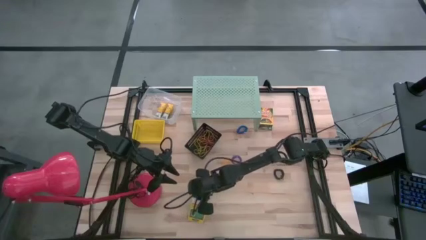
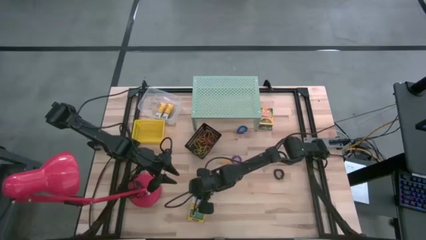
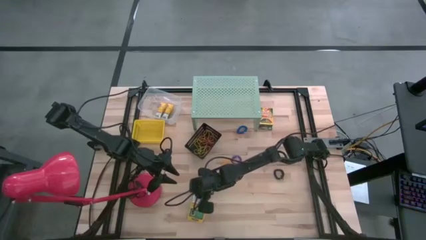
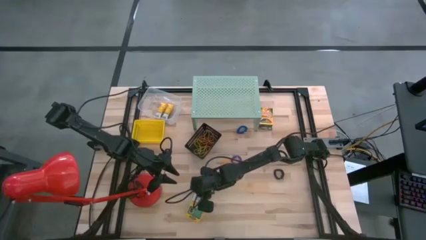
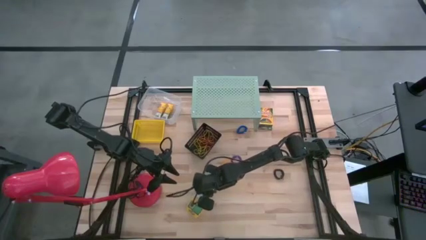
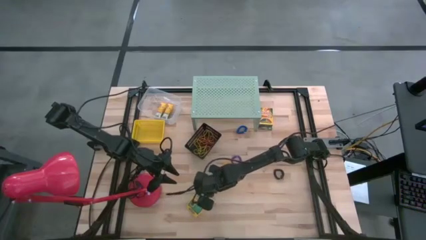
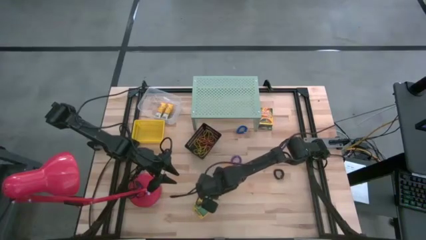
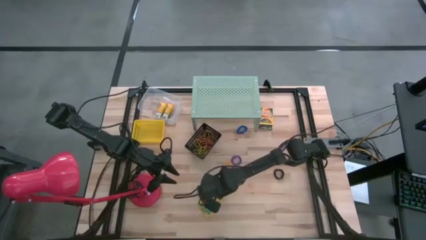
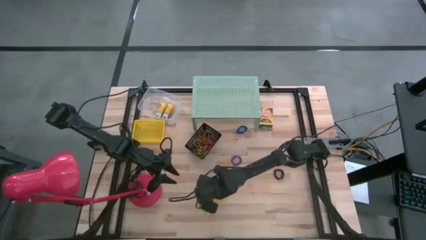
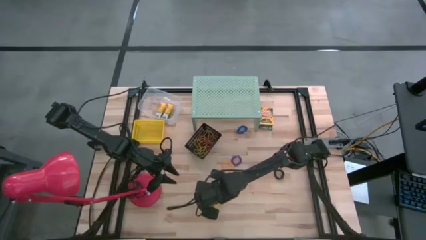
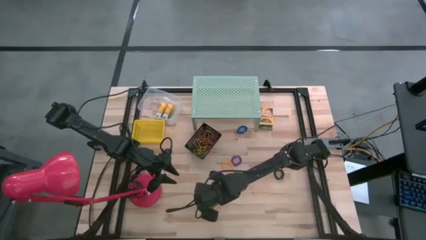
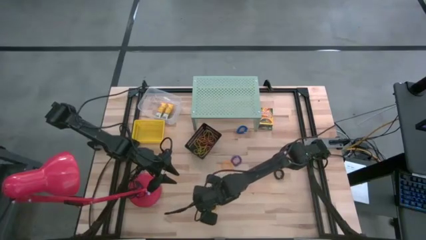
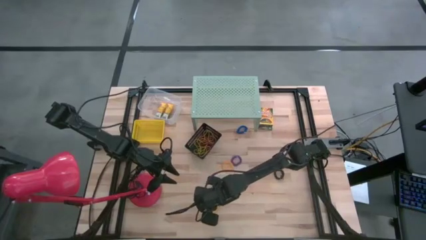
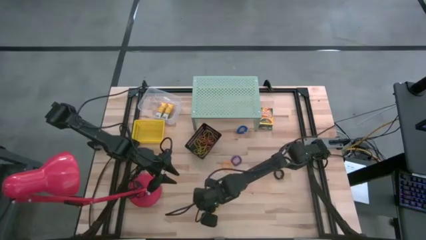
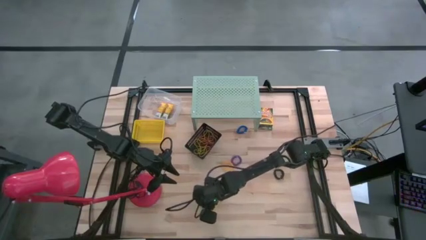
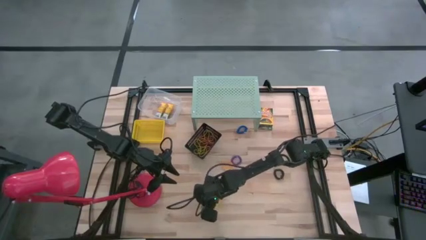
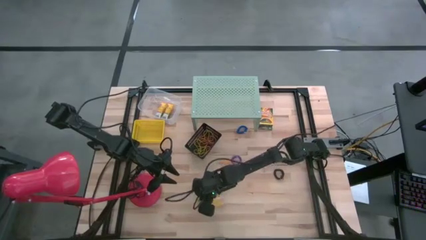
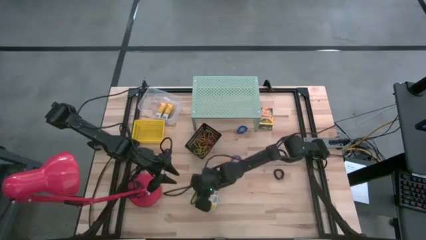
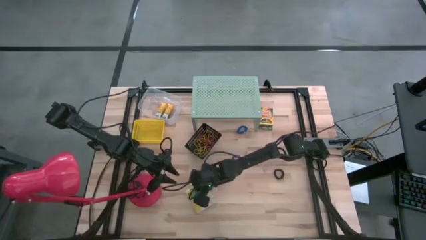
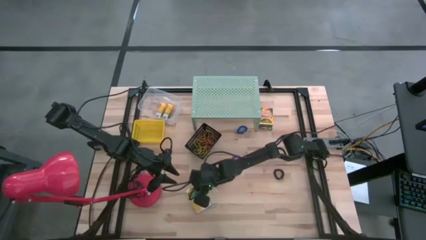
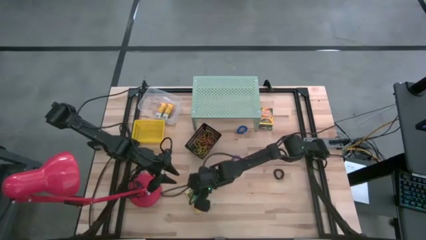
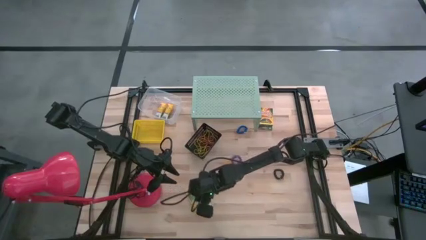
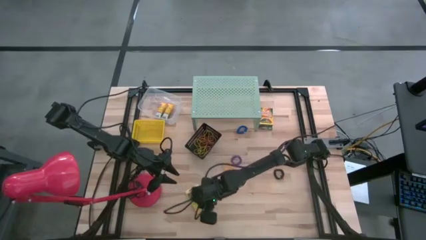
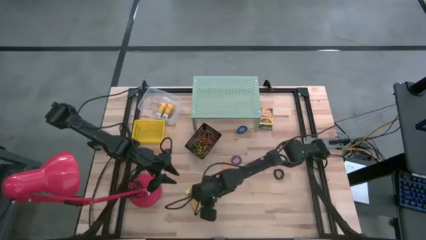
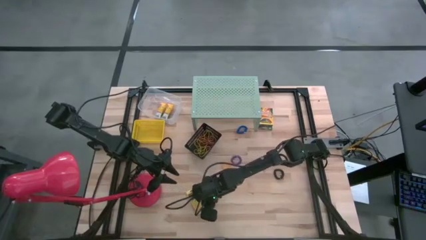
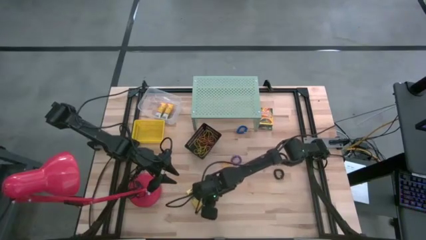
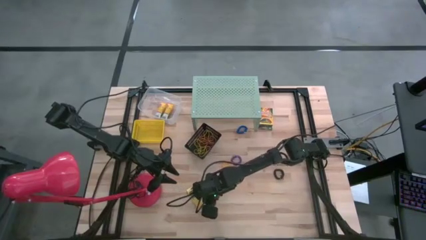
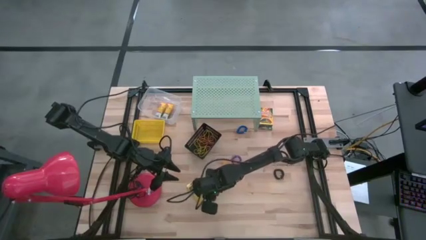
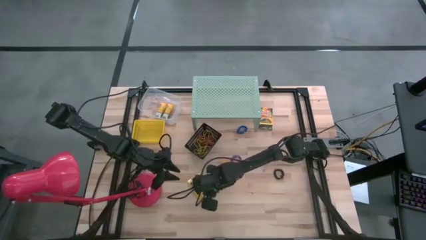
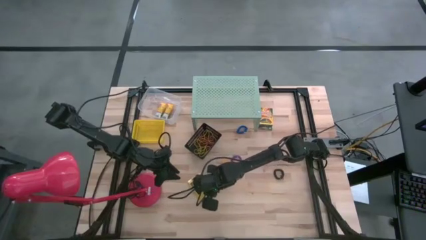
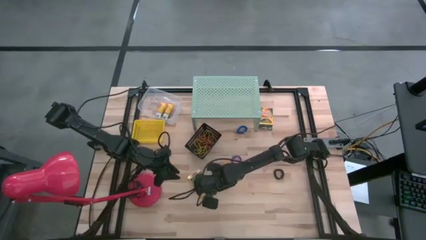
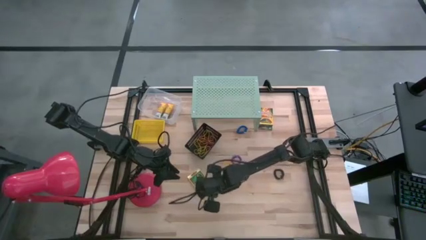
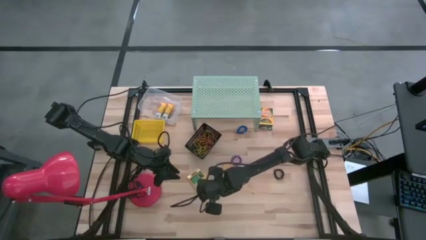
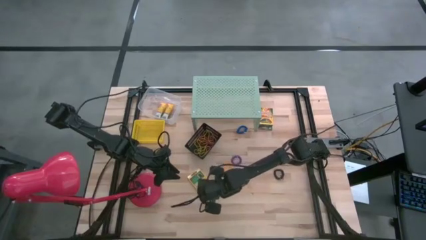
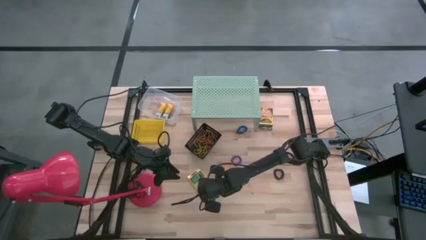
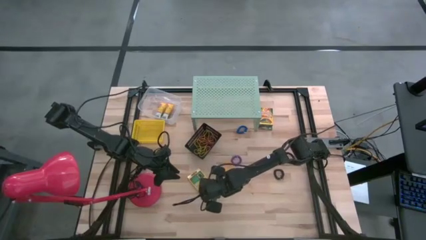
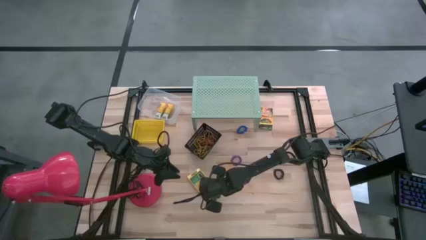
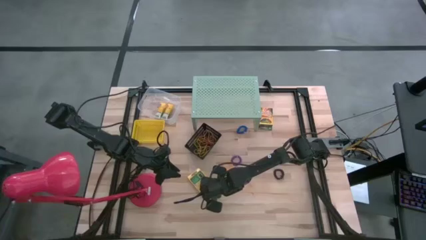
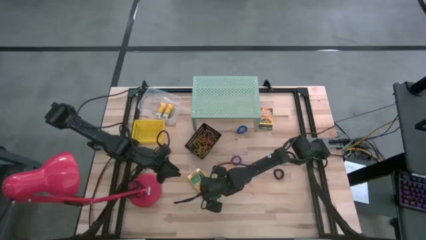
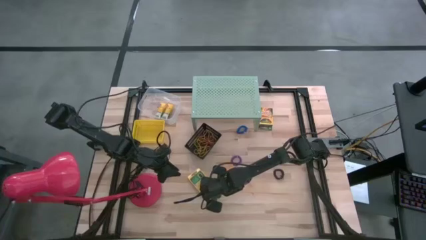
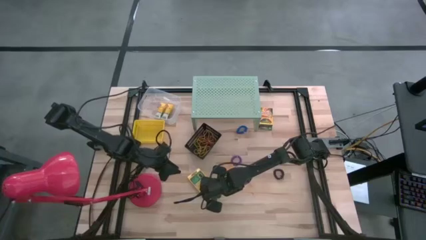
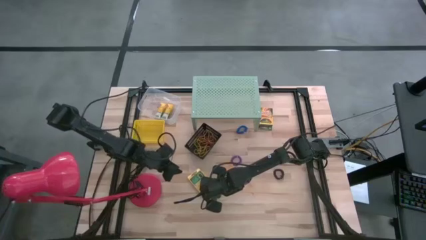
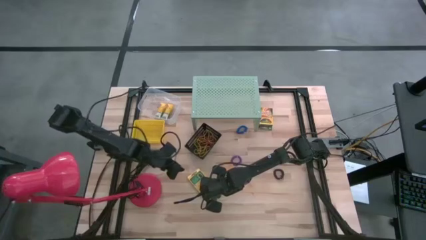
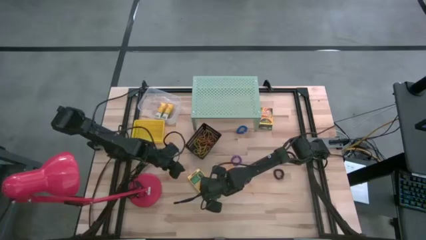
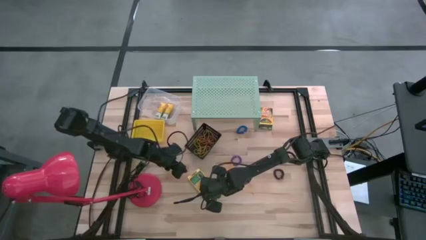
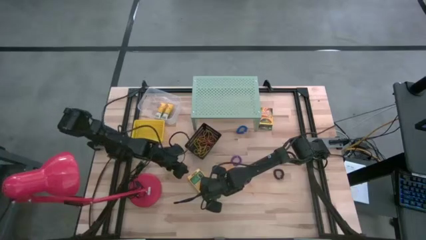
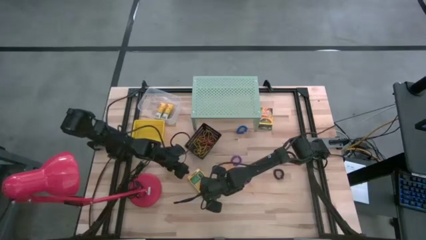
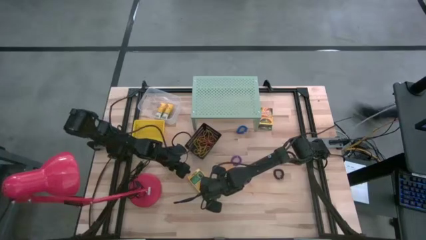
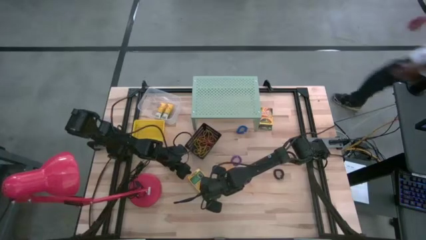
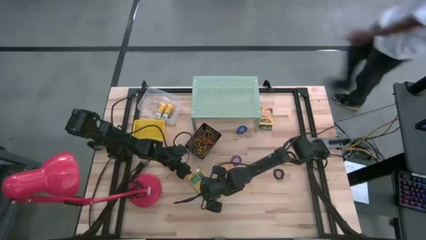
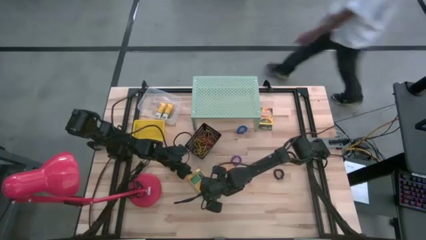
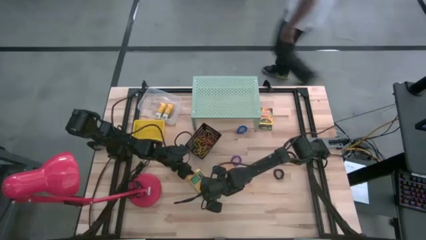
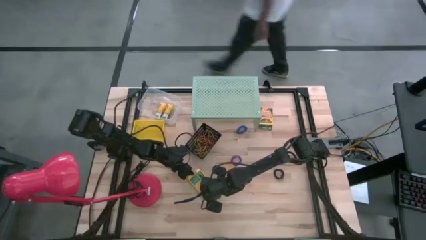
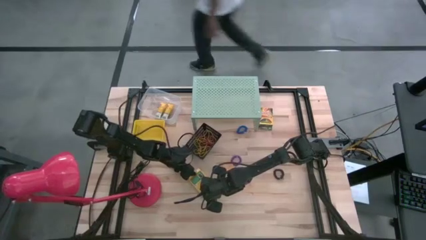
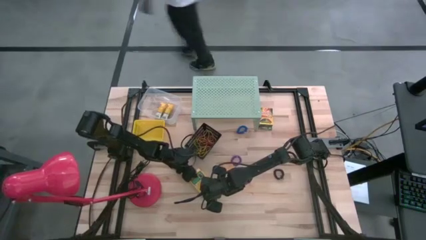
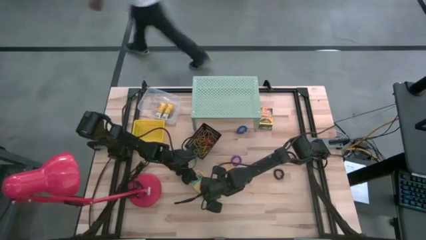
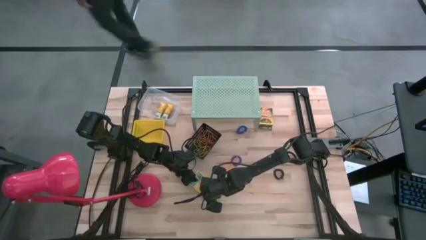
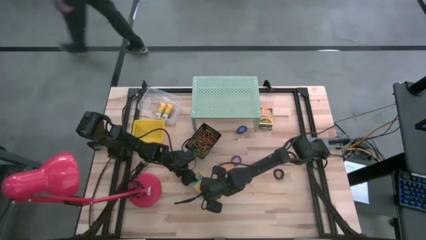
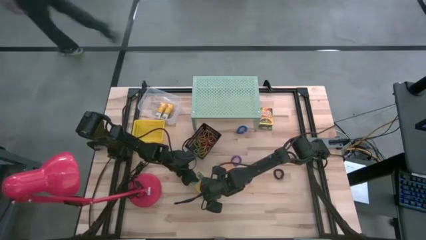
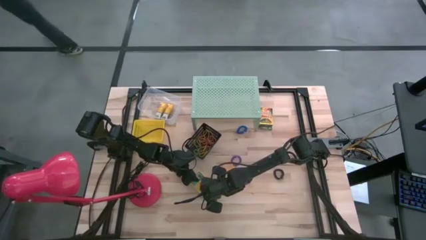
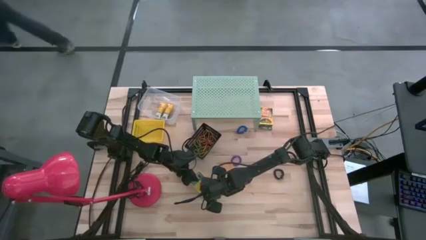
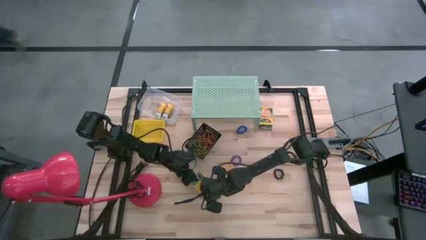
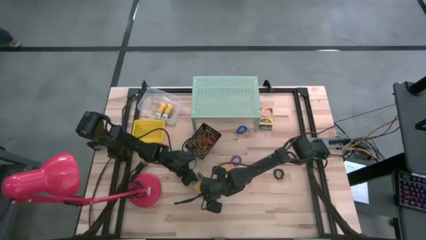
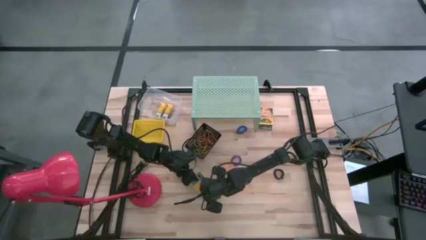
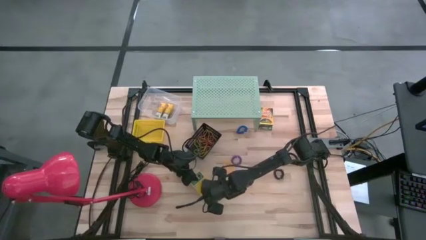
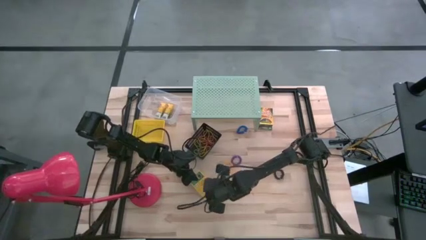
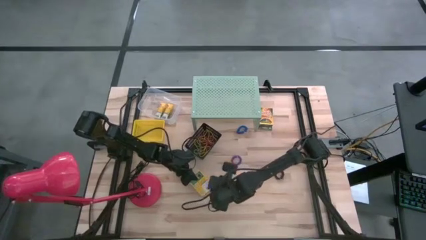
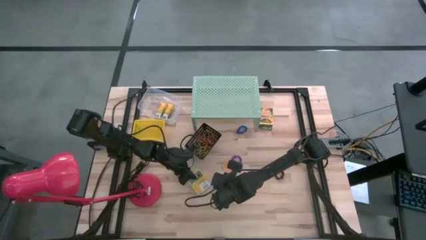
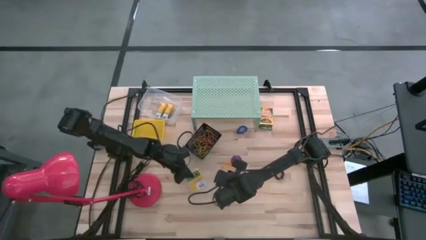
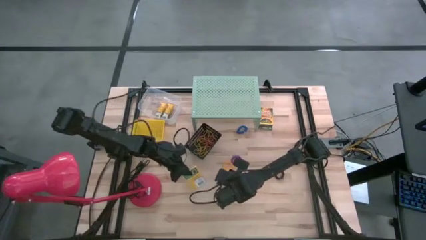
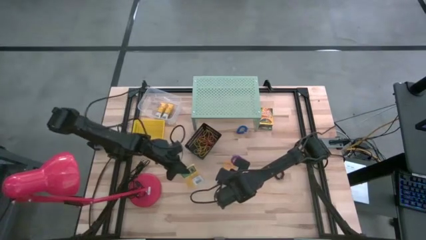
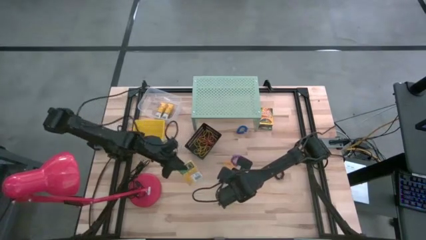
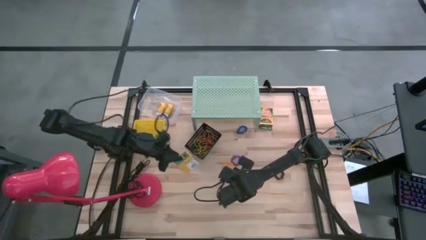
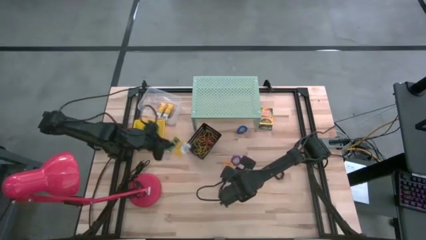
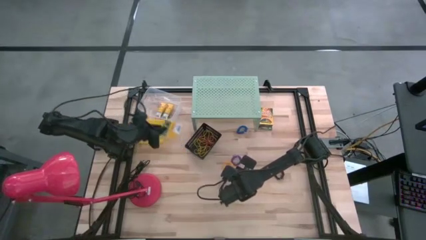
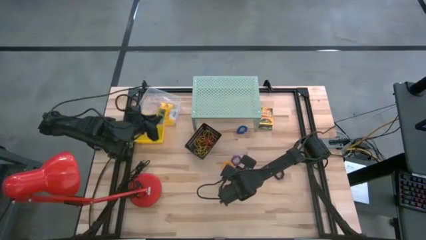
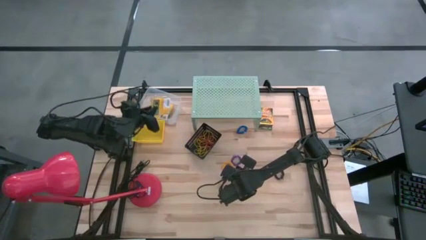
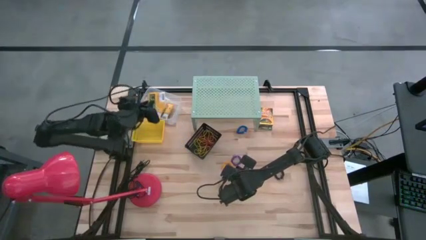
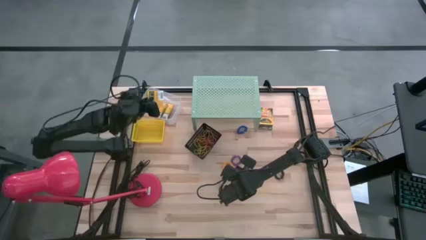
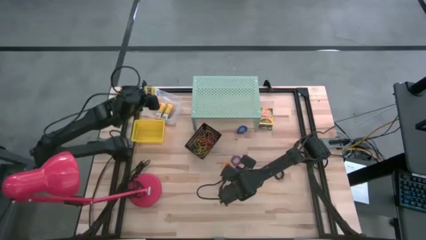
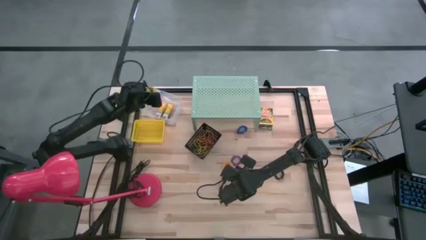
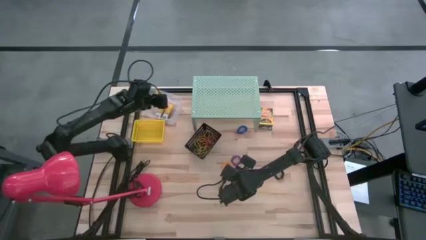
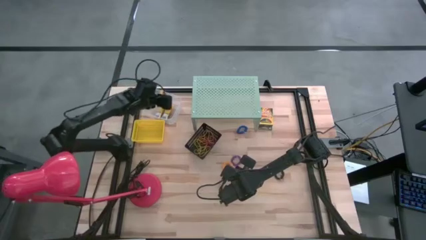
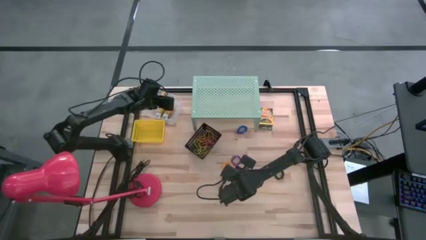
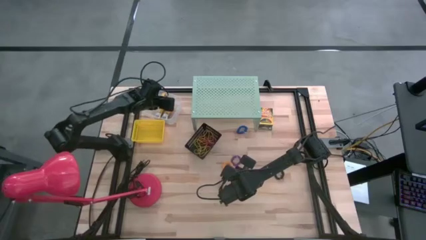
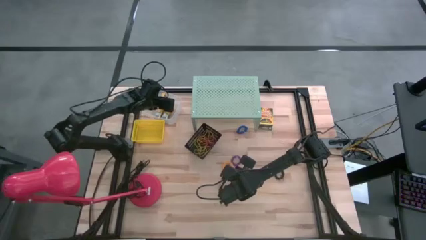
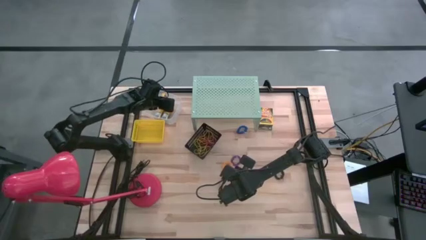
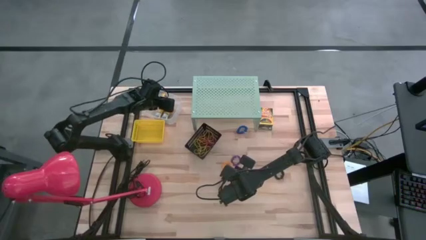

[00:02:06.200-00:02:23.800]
Task: Pick & Place Office Desk Supplies
Put the bottom big crayon box into the transparent bin
